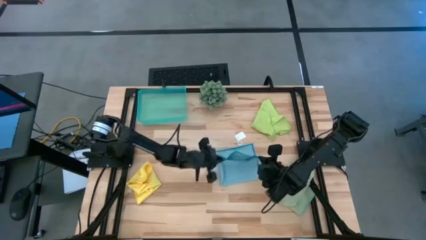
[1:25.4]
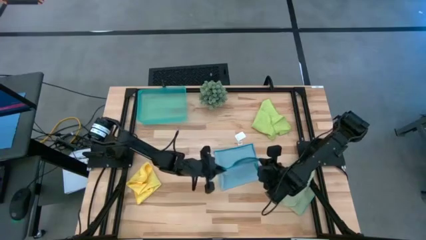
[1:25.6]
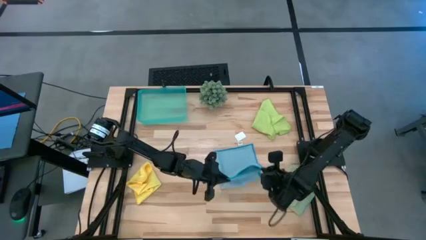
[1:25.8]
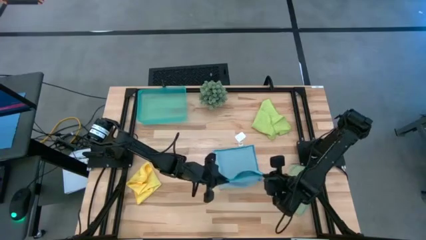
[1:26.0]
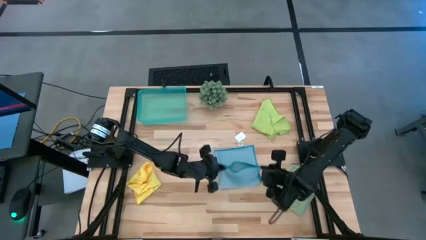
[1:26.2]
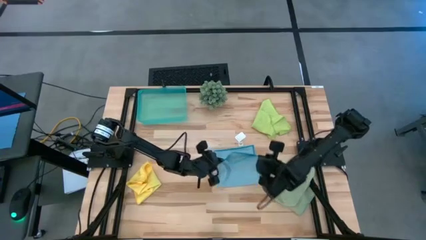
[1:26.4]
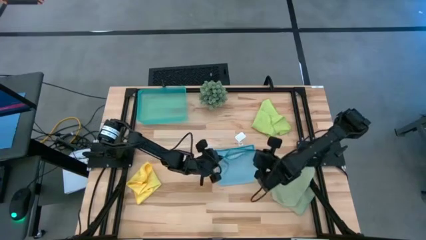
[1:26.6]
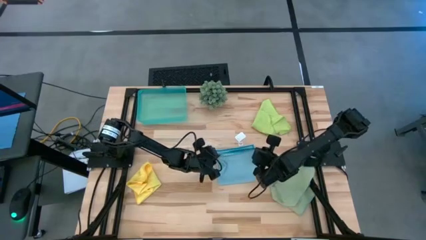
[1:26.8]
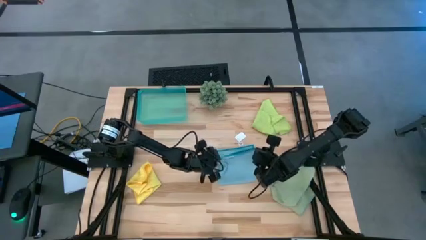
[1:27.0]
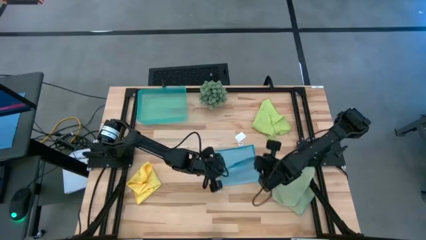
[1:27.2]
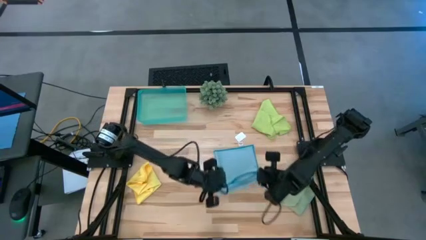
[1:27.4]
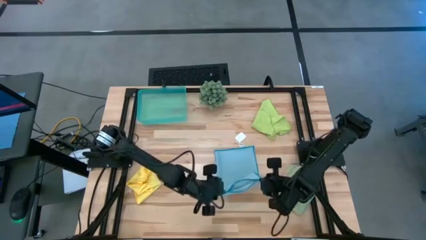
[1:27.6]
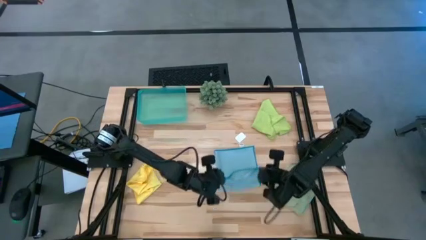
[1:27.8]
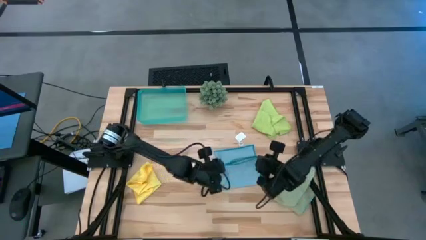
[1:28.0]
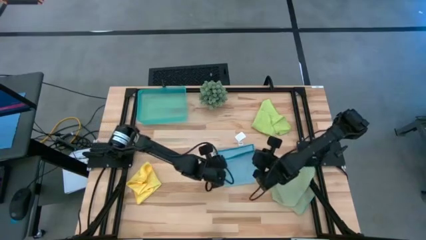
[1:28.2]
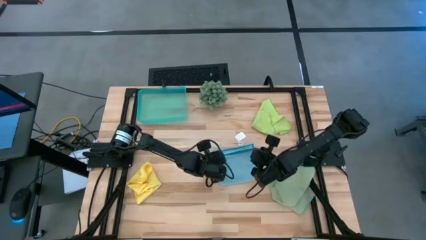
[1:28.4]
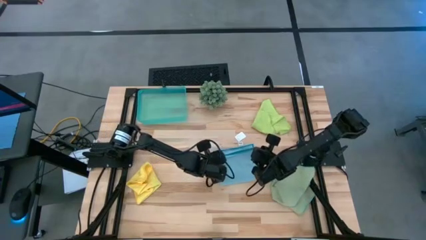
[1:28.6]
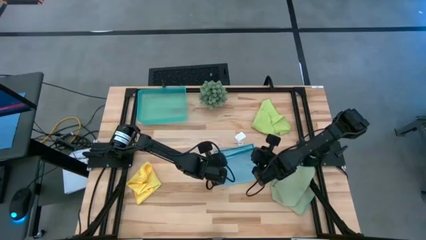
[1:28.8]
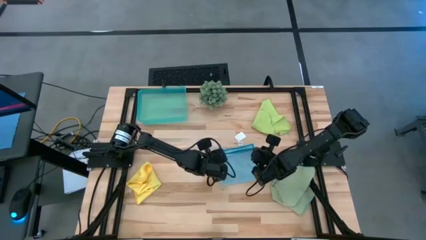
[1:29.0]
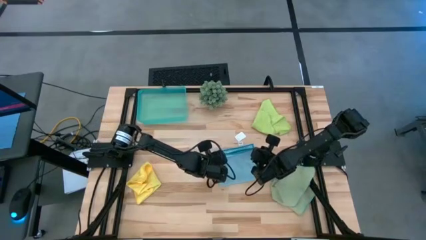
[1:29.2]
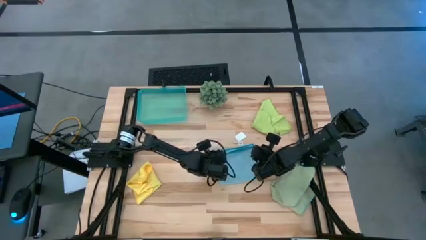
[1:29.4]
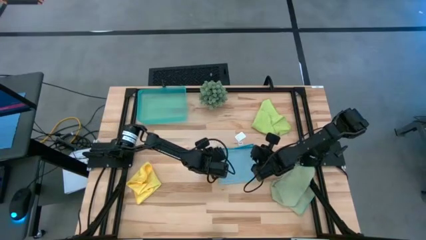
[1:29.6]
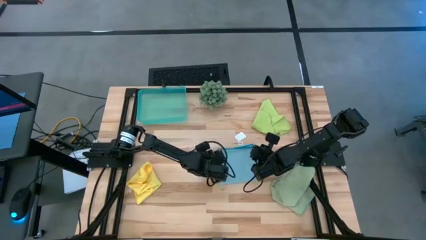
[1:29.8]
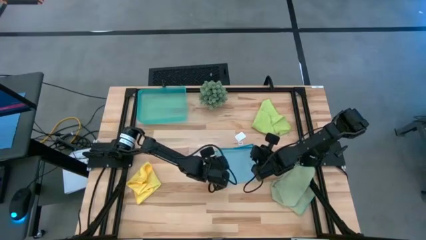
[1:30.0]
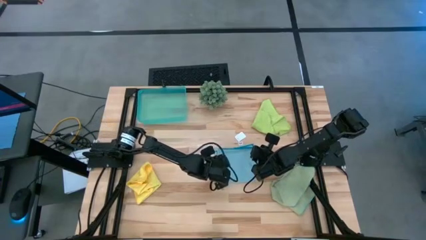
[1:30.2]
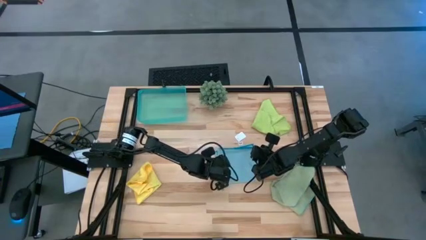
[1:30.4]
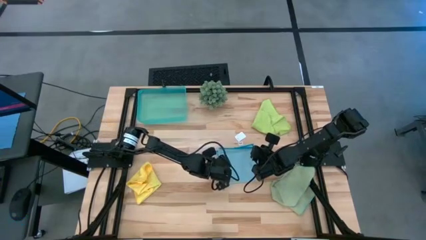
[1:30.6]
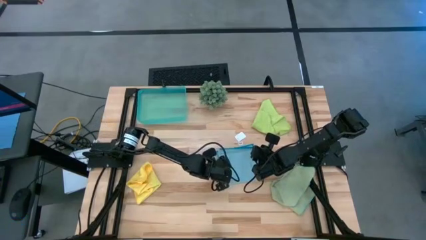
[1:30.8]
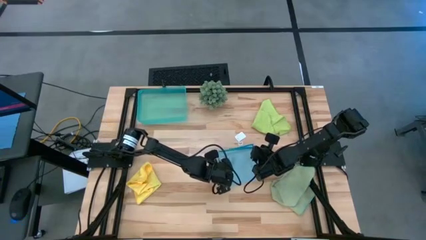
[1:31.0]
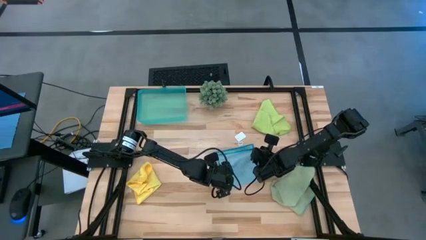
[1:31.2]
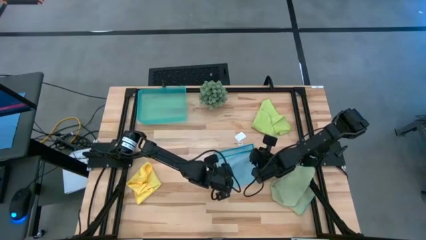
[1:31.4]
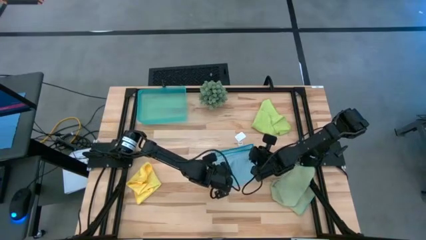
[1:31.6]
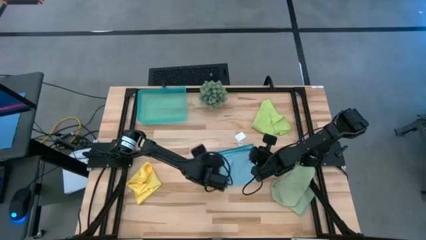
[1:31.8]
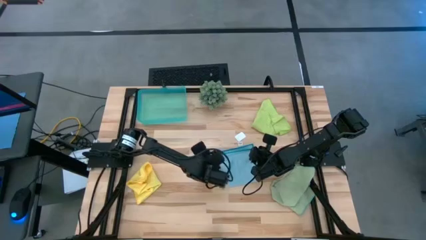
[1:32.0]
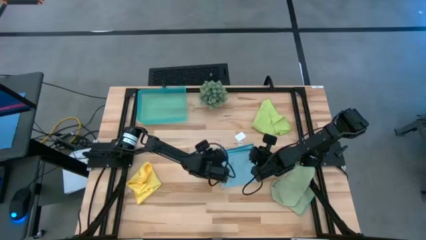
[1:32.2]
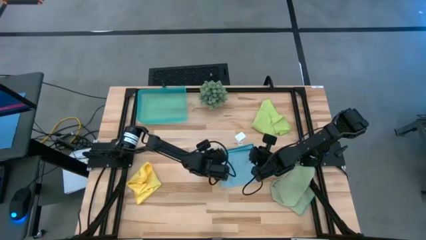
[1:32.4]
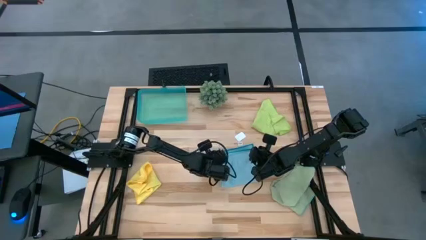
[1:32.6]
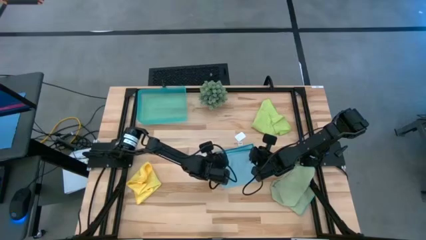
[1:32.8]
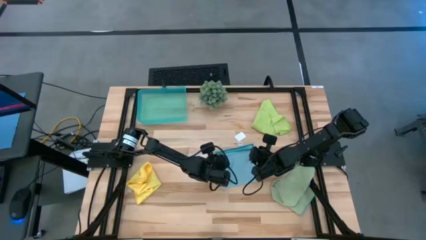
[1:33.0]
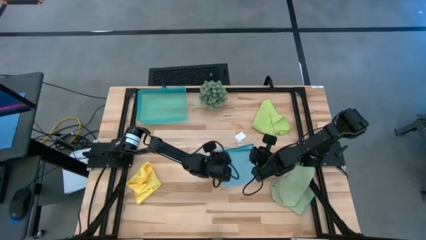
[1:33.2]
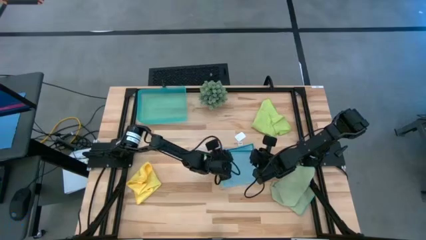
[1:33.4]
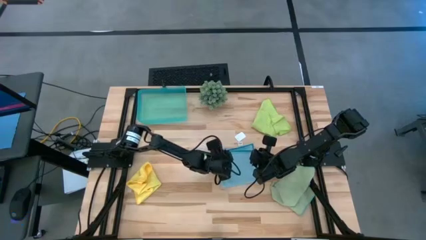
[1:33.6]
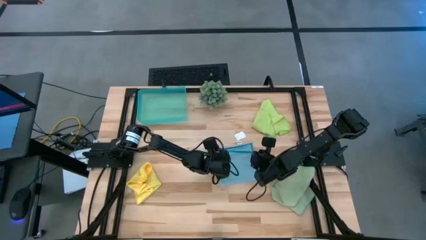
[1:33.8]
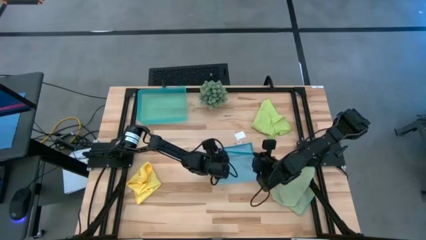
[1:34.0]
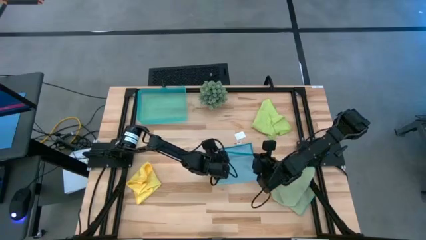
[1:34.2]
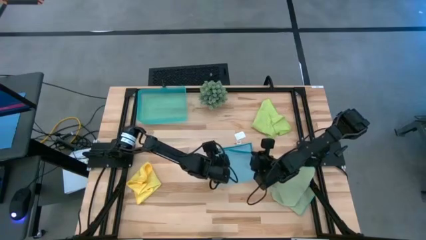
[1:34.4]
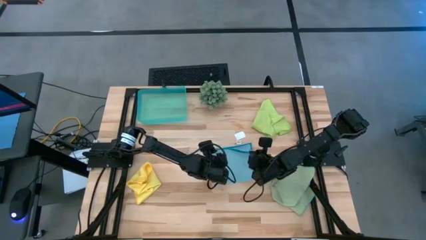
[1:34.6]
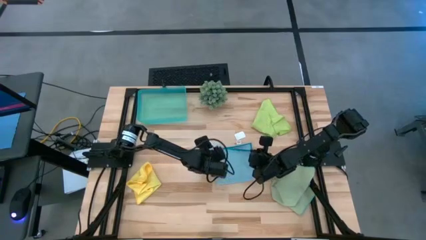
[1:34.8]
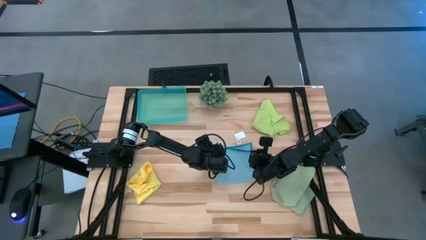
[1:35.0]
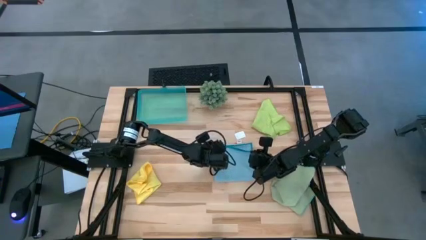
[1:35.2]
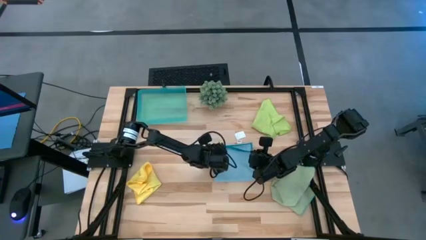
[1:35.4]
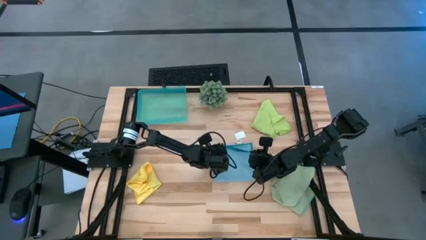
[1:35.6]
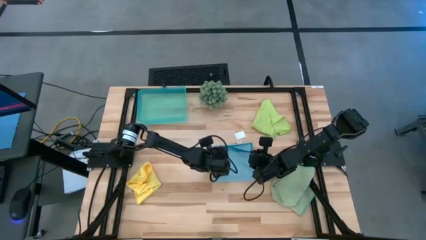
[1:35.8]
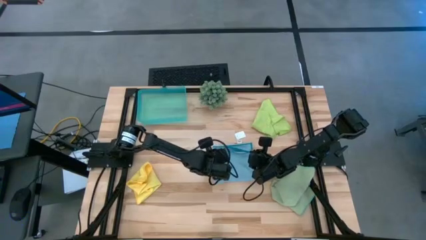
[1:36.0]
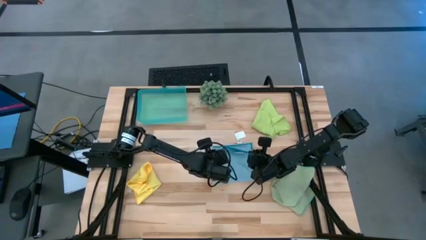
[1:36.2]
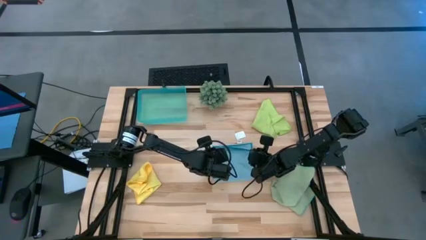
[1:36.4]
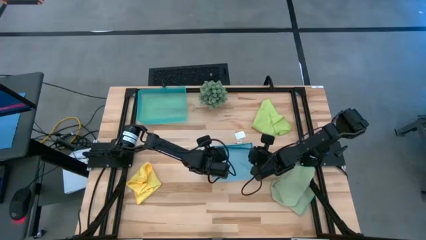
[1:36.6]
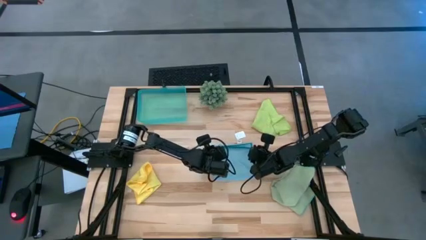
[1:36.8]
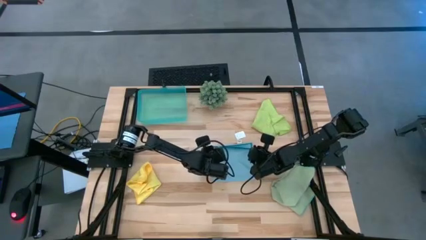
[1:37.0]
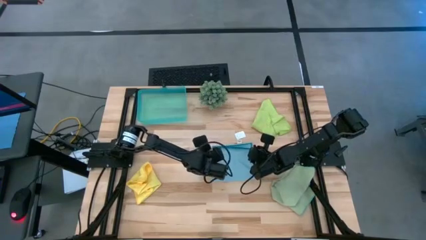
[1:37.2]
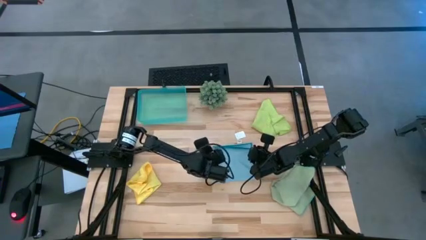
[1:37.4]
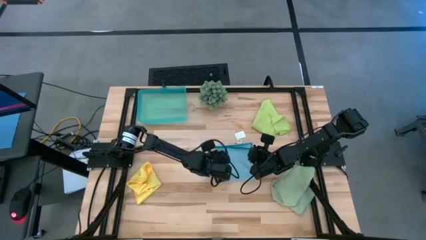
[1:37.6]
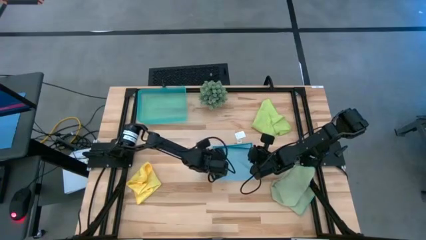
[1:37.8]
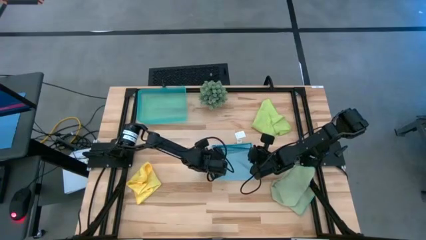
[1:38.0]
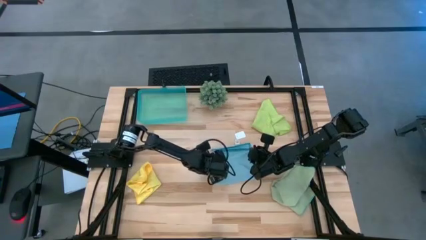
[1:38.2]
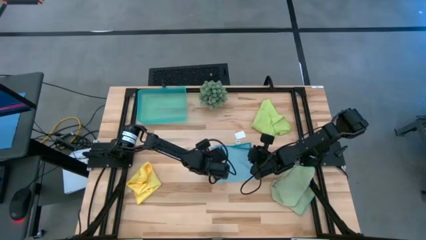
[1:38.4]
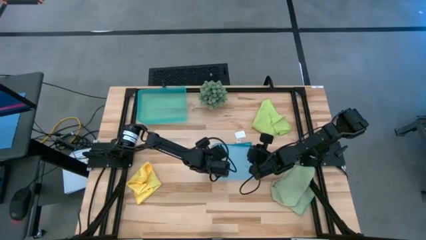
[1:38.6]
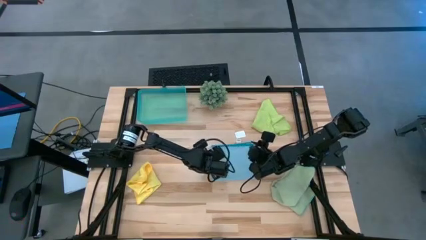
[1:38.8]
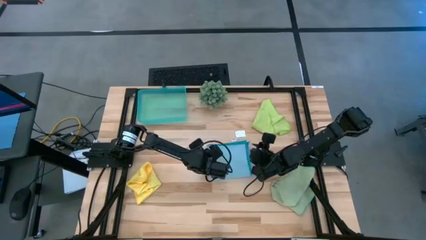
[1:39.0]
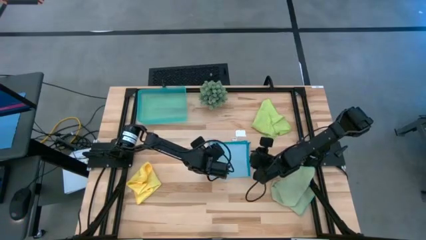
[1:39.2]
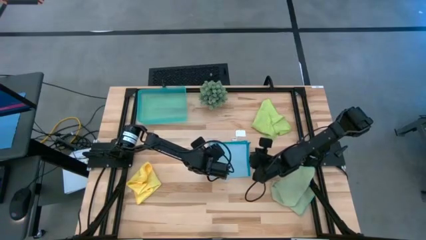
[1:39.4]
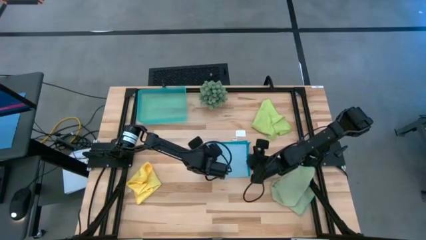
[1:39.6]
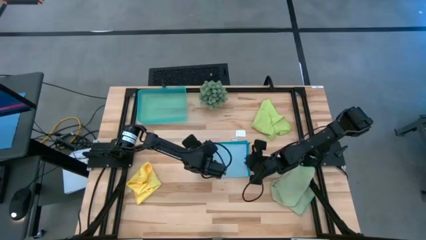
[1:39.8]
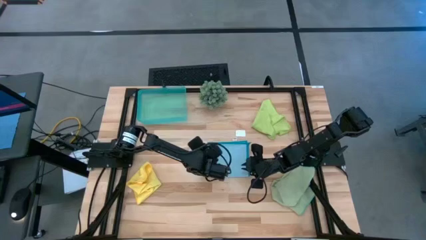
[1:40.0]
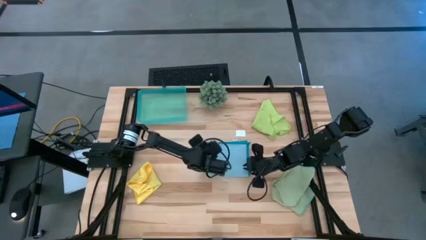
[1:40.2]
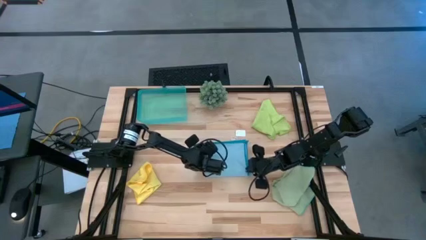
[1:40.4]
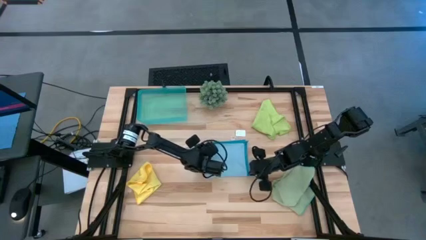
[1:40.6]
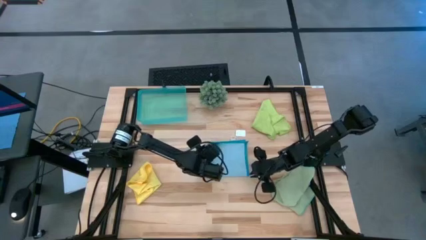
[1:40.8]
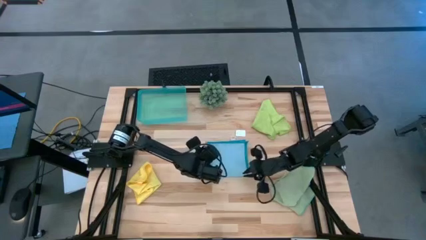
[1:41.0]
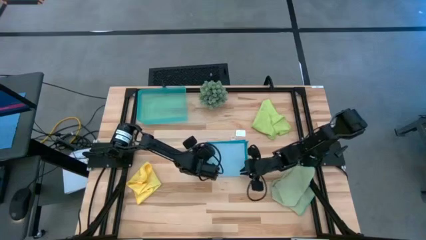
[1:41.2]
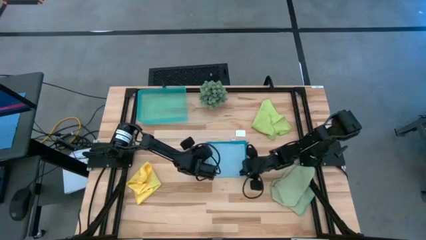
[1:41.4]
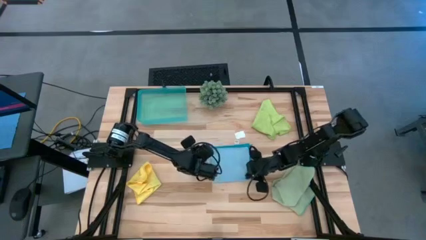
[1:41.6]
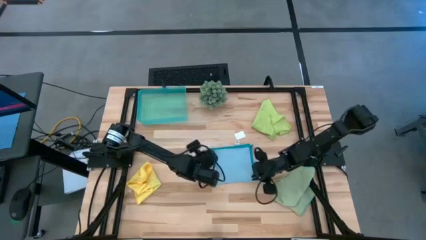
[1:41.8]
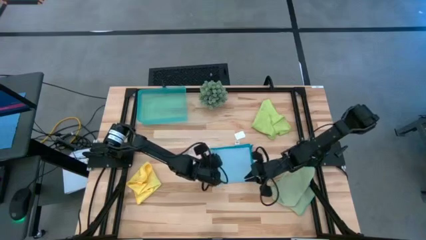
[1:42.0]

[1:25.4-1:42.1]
Task: Fold microfiber towels
Fold the blue microfiber cloth
